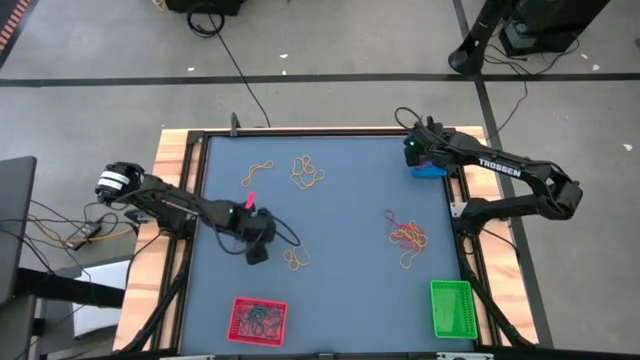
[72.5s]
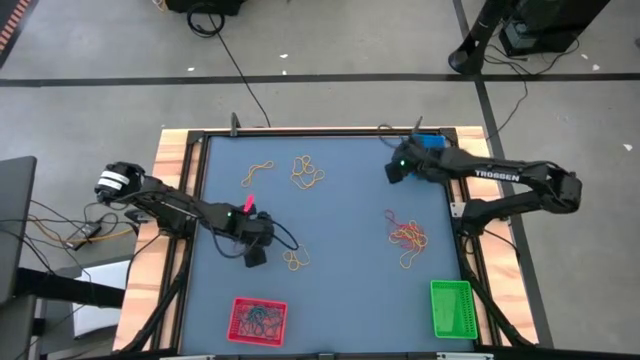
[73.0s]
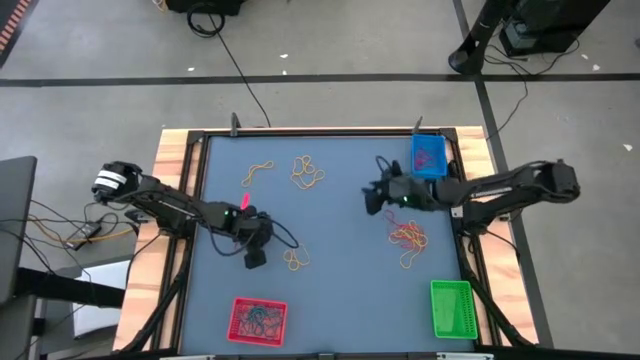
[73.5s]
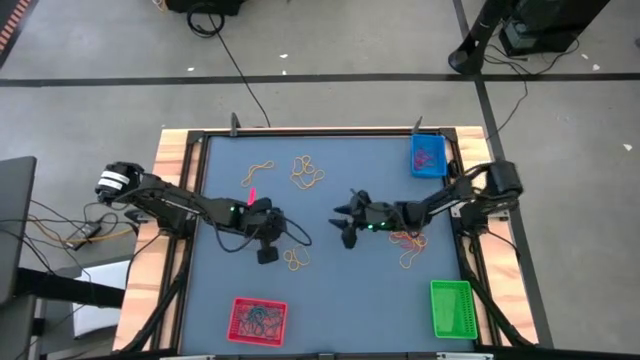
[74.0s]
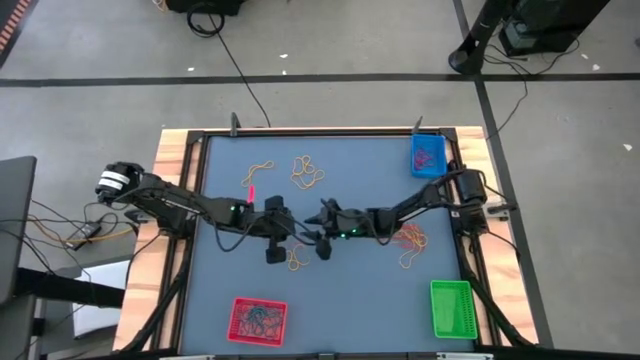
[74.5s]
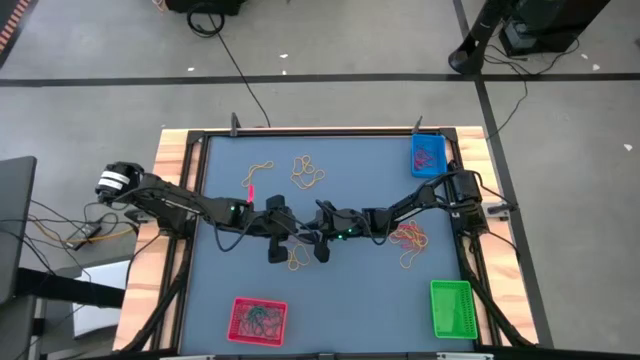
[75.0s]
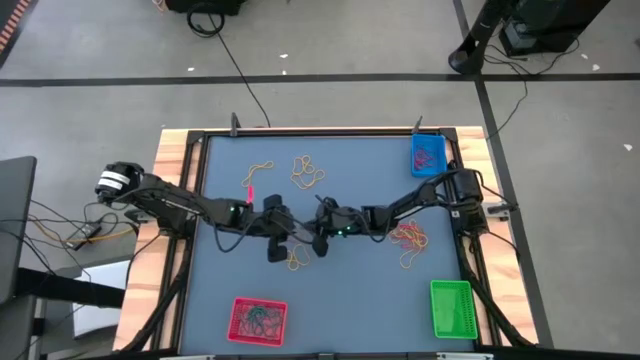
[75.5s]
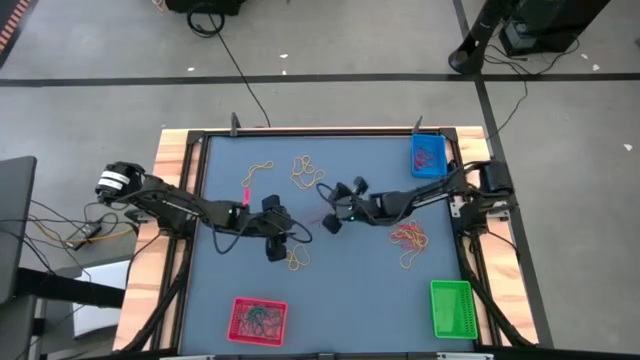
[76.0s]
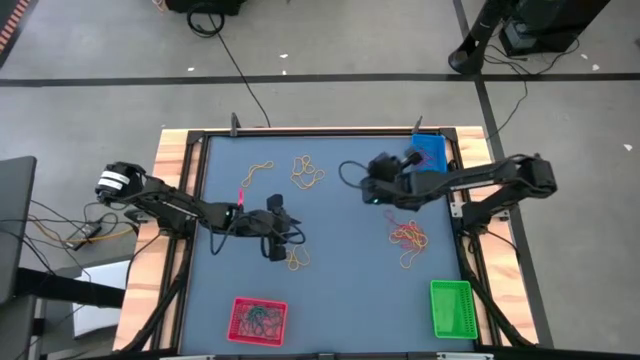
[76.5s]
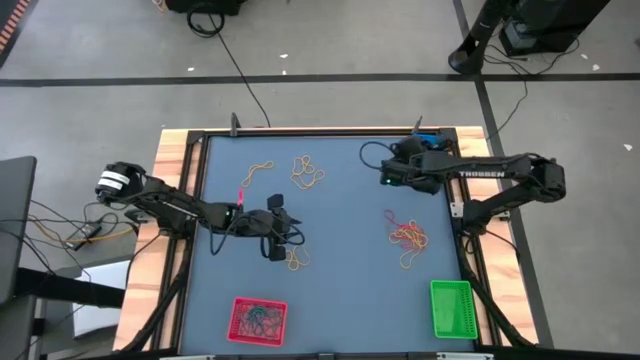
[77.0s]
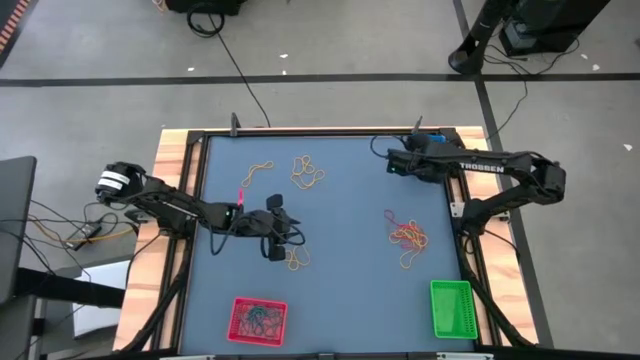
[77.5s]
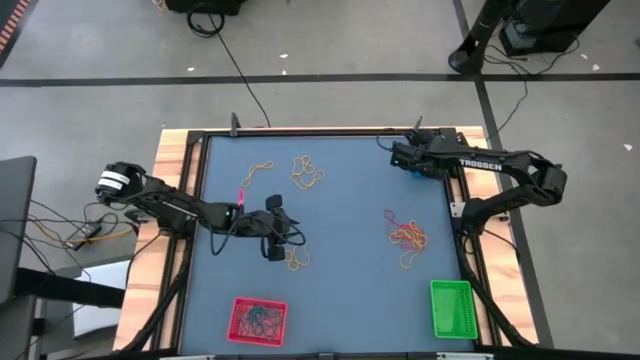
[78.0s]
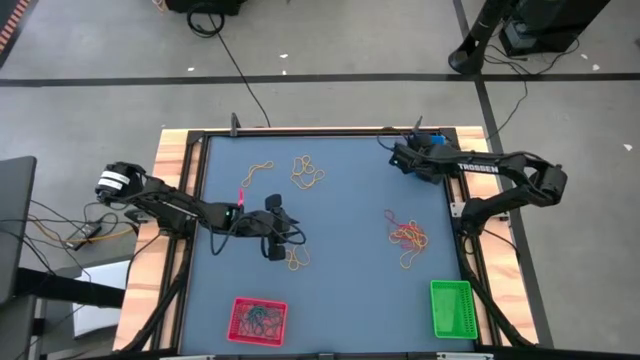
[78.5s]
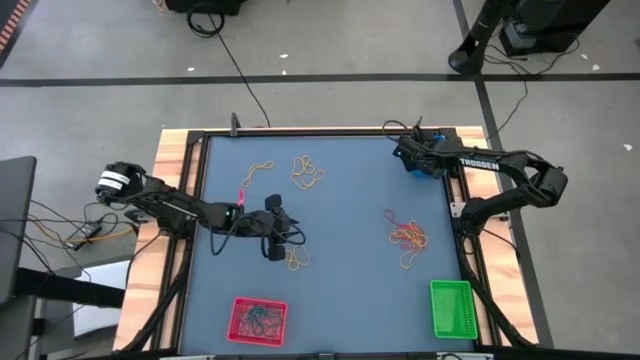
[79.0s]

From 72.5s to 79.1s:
Task: Sort rubber bands into baskets
Put the red rubber band into the blue bin

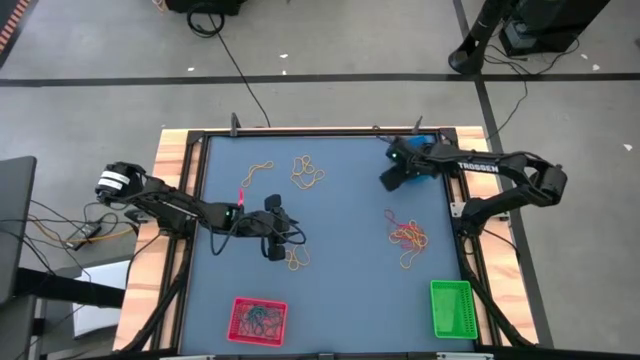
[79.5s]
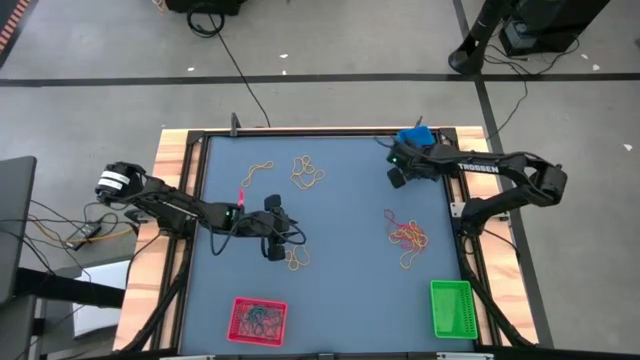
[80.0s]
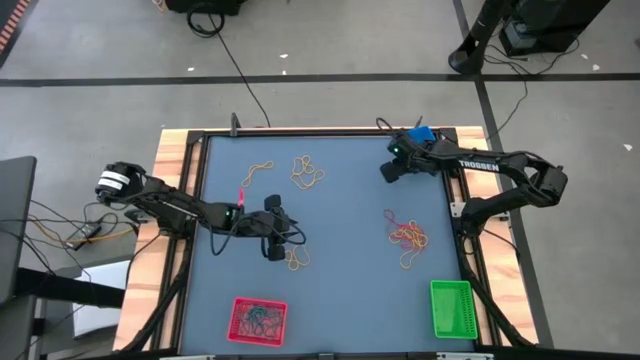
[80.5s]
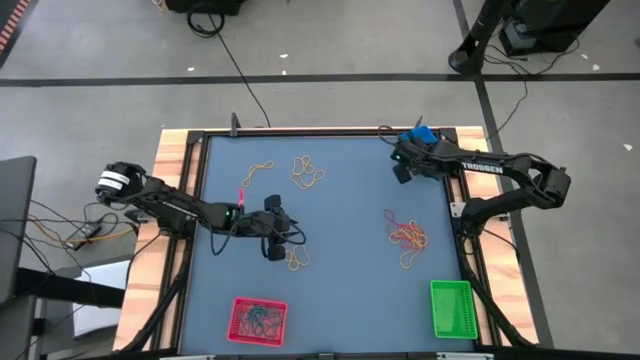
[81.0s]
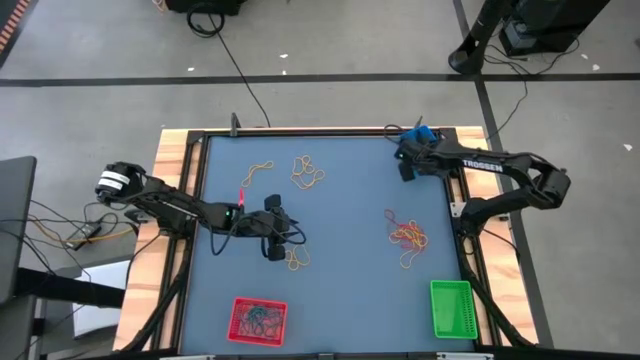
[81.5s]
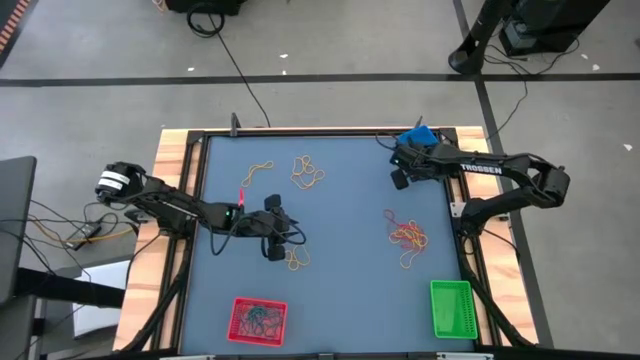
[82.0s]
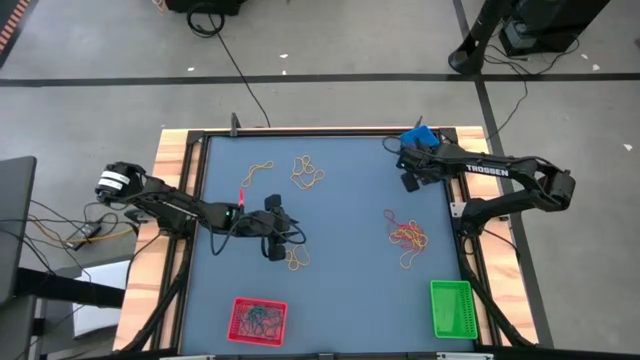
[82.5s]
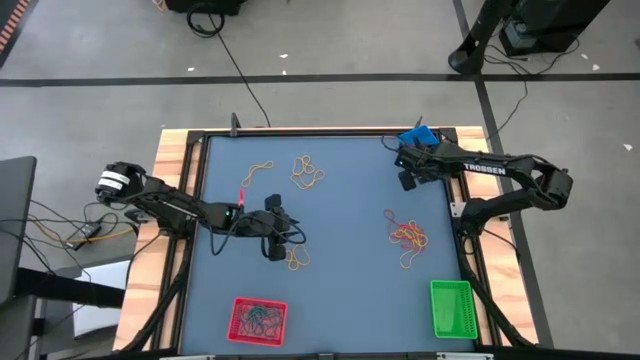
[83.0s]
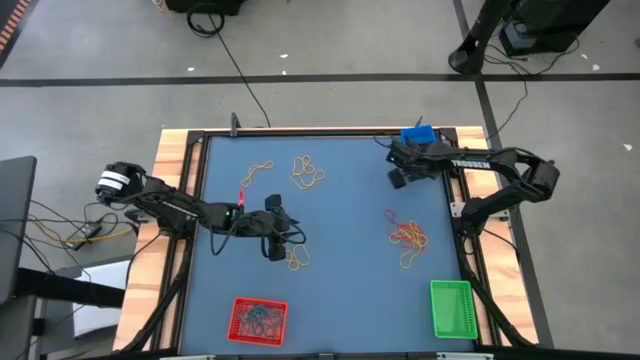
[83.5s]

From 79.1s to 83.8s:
Adjust the blue bin

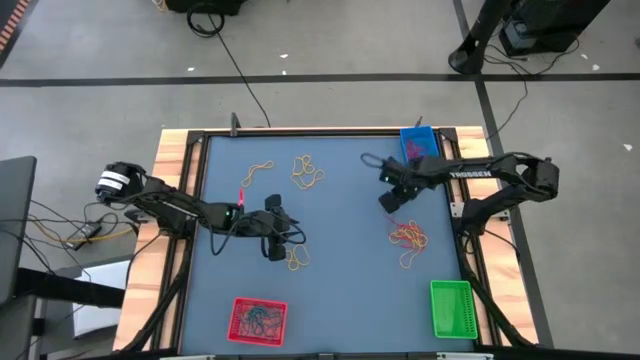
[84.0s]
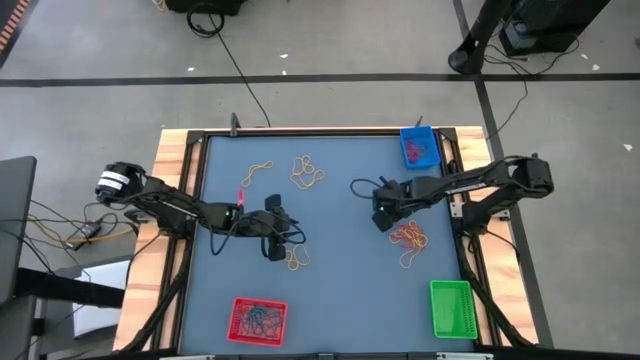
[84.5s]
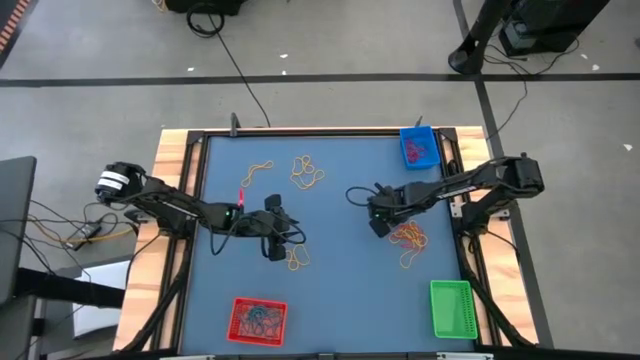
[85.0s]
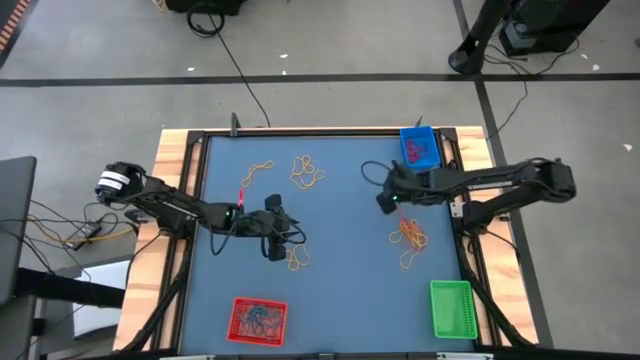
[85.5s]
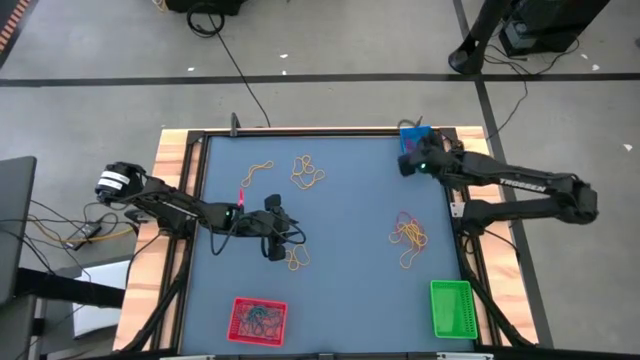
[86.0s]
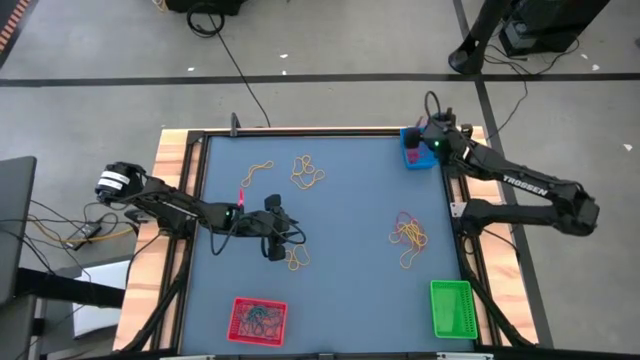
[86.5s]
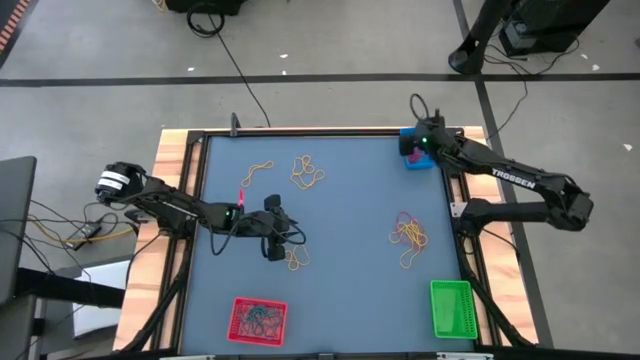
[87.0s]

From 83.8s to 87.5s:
Put the red rubber band into the blue bin

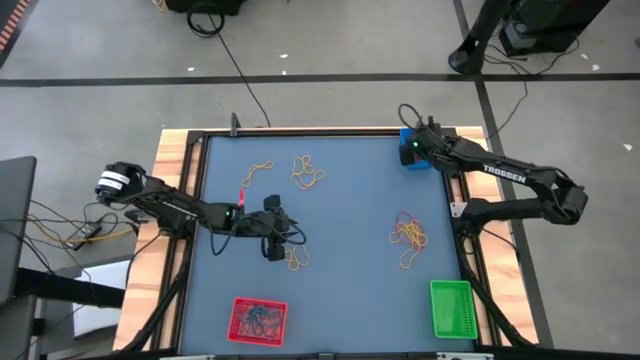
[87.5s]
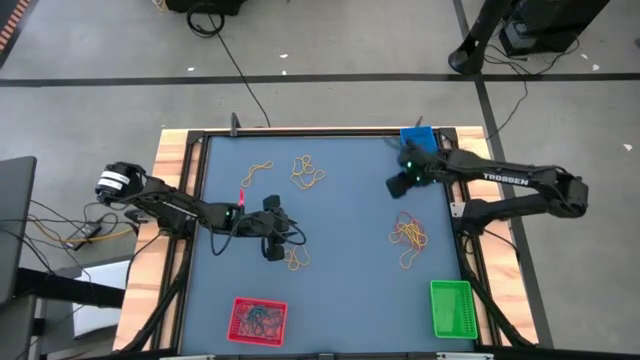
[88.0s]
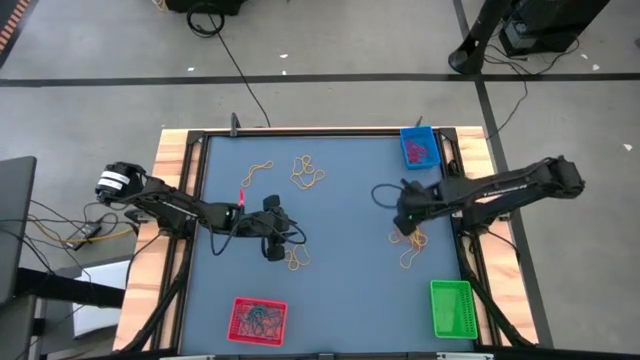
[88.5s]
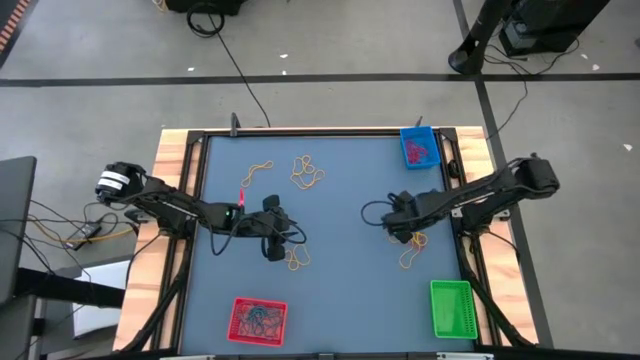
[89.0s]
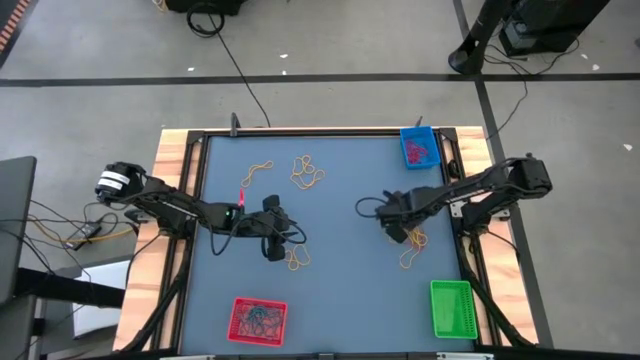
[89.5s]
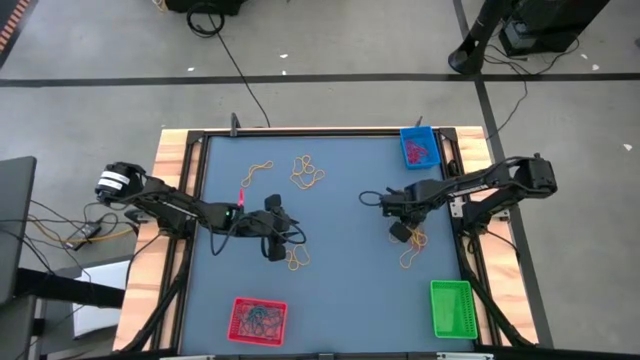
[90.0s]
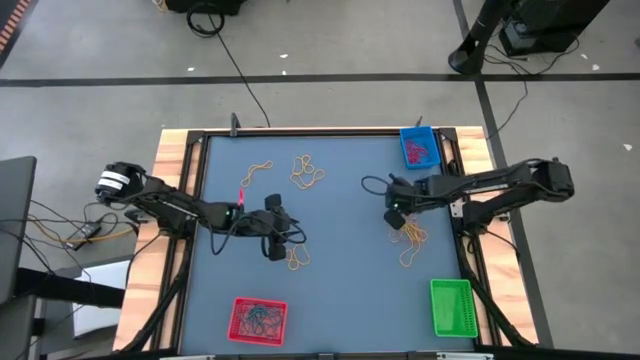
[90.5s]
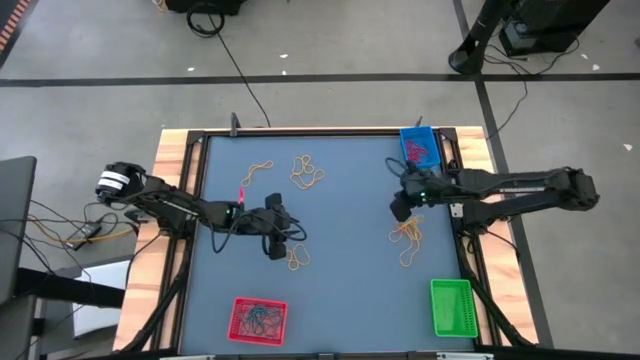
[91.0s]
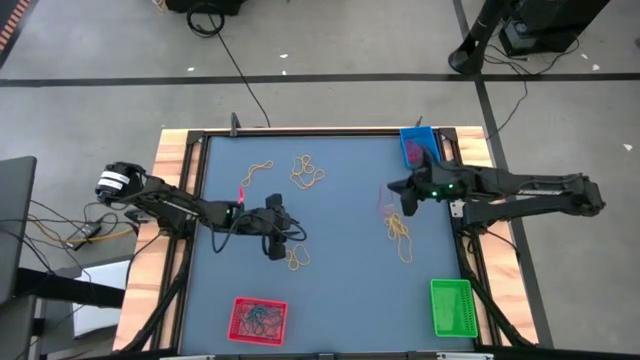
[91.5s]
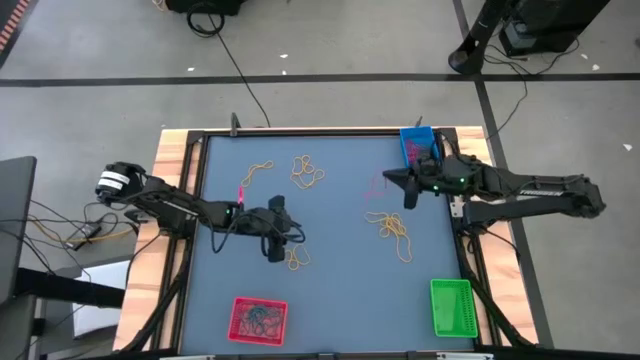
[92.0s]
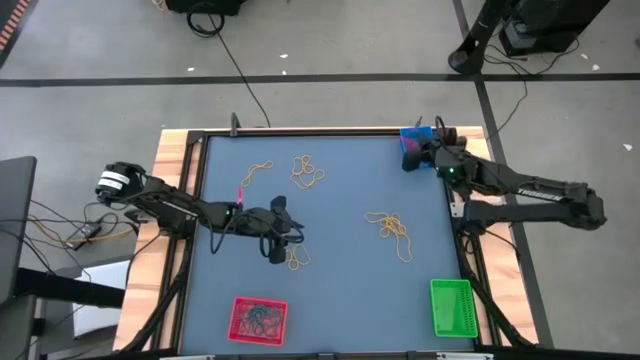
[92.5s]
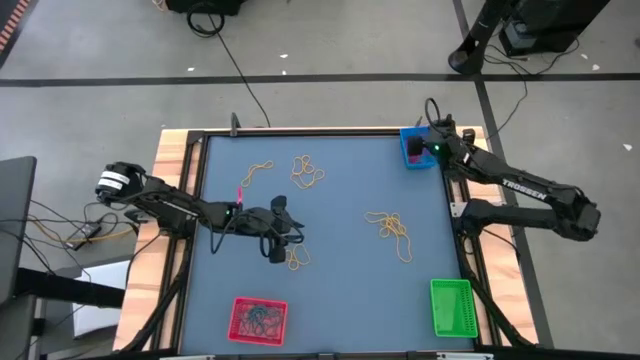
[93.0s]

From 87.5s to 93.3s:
Put the red rubber band into the blue bin
